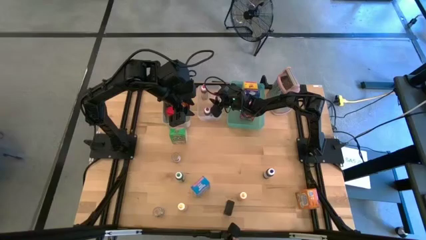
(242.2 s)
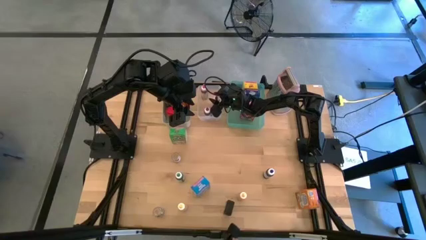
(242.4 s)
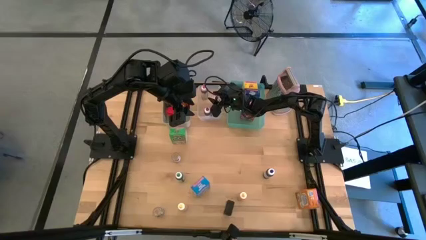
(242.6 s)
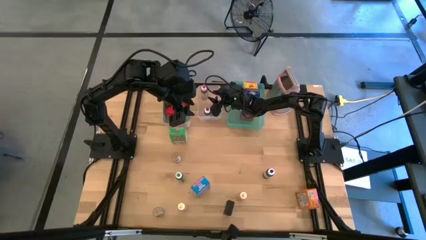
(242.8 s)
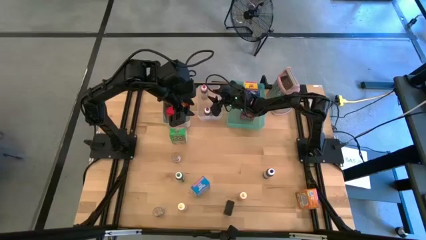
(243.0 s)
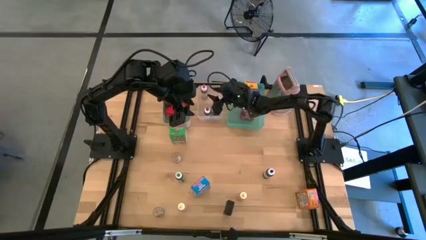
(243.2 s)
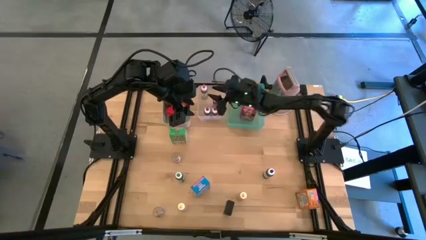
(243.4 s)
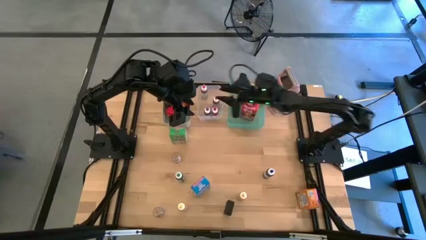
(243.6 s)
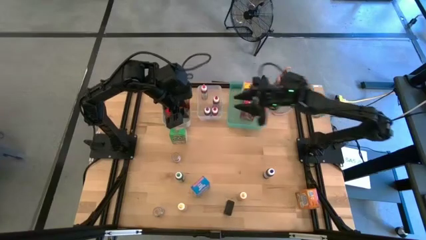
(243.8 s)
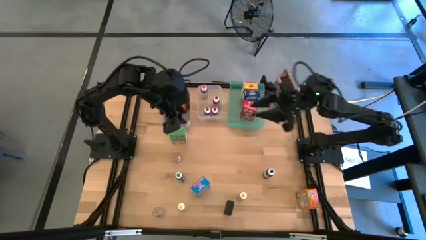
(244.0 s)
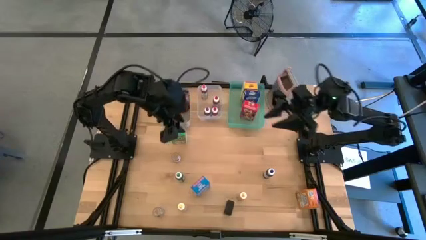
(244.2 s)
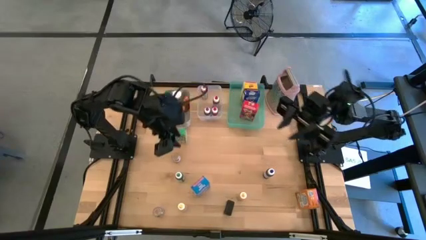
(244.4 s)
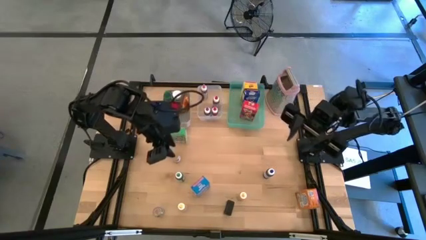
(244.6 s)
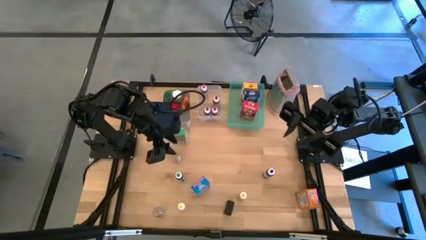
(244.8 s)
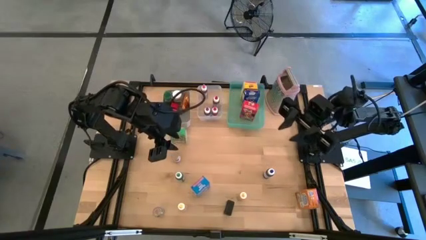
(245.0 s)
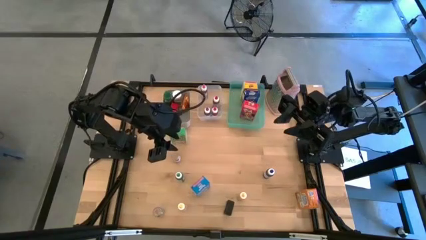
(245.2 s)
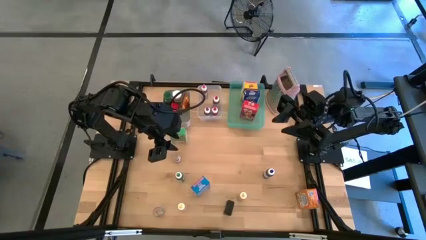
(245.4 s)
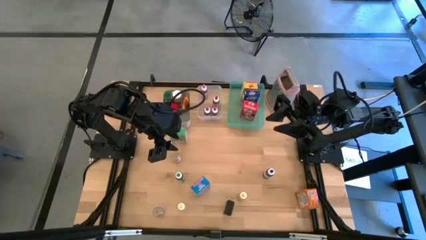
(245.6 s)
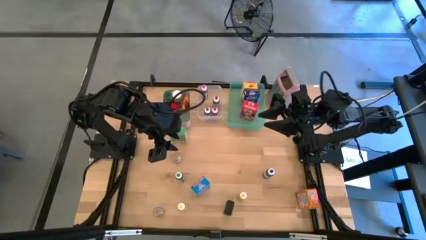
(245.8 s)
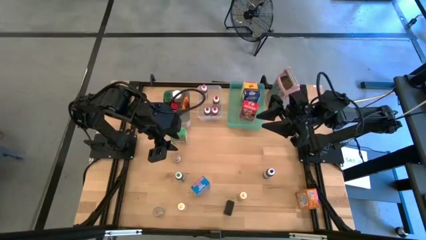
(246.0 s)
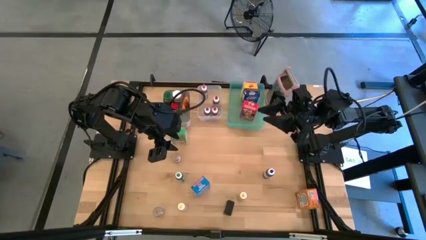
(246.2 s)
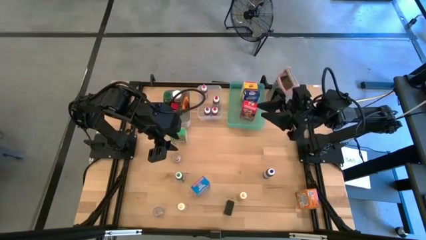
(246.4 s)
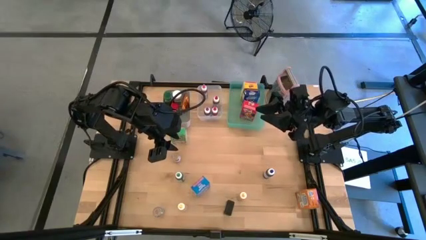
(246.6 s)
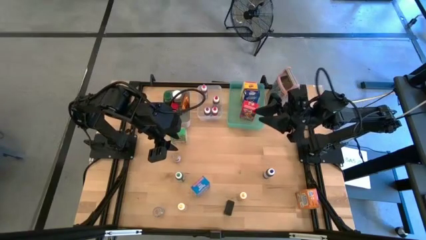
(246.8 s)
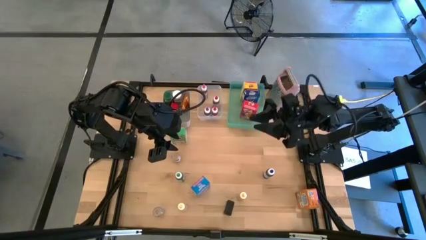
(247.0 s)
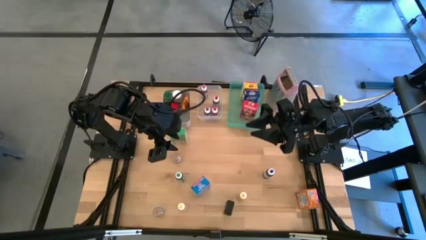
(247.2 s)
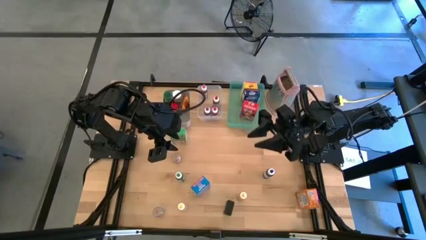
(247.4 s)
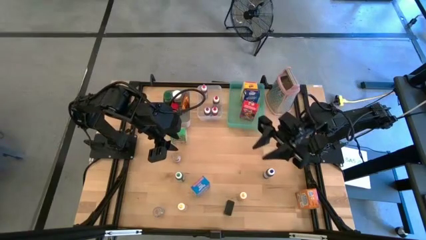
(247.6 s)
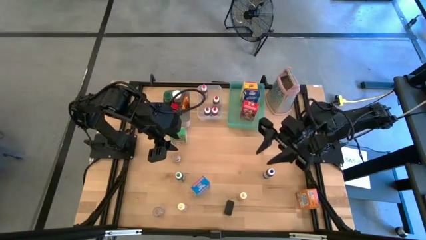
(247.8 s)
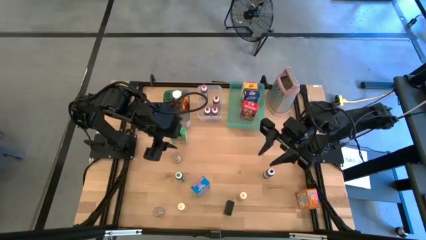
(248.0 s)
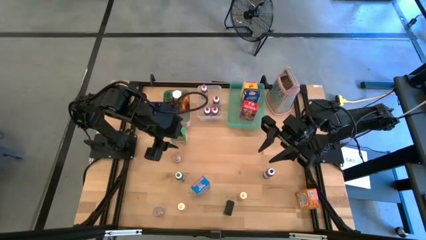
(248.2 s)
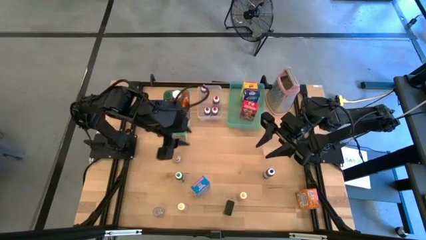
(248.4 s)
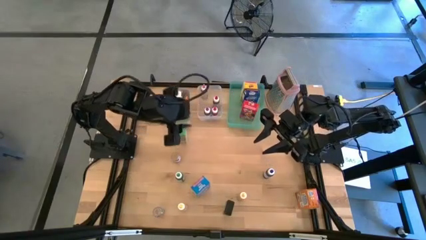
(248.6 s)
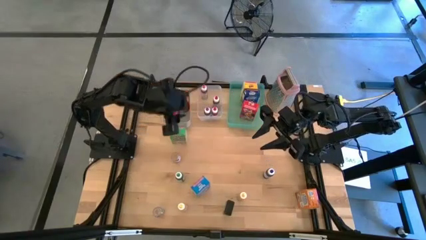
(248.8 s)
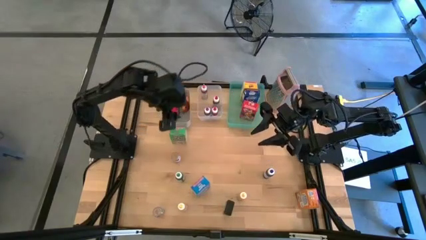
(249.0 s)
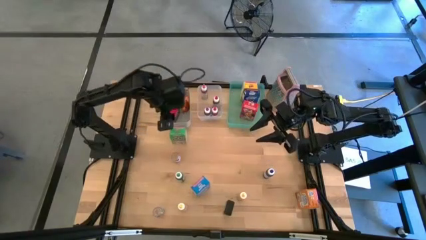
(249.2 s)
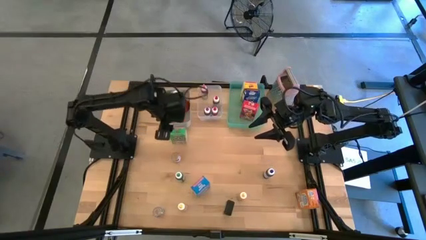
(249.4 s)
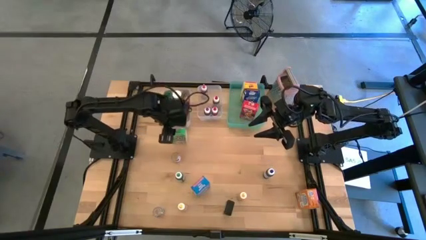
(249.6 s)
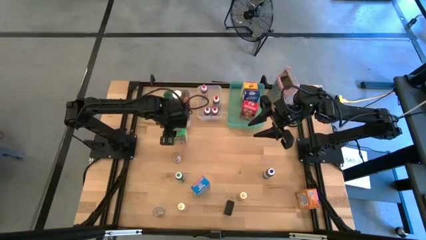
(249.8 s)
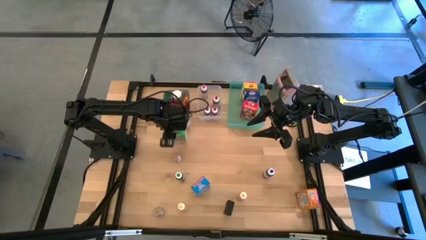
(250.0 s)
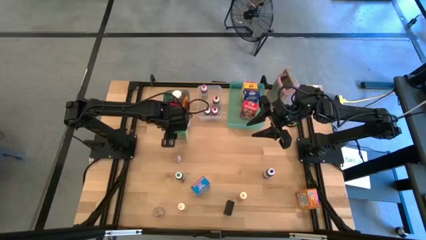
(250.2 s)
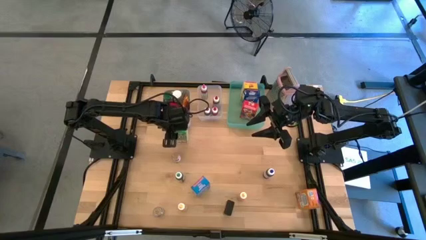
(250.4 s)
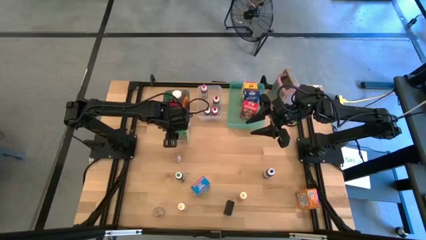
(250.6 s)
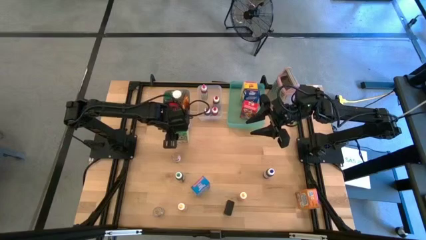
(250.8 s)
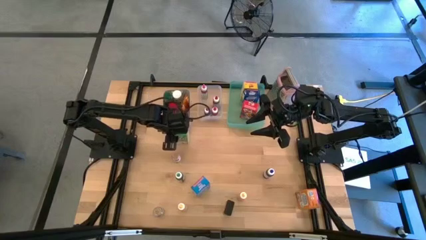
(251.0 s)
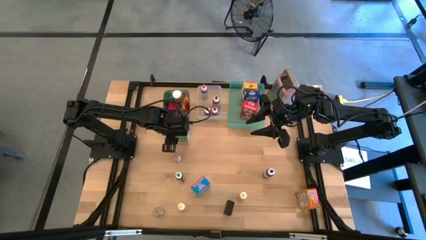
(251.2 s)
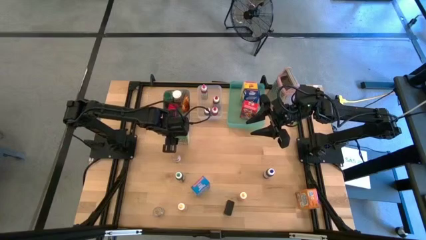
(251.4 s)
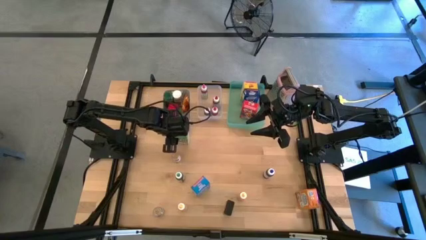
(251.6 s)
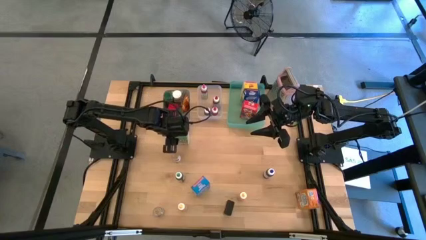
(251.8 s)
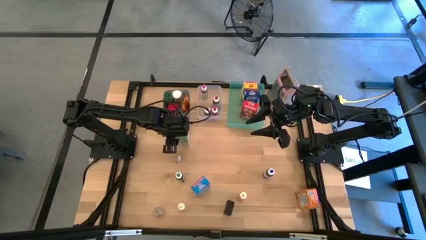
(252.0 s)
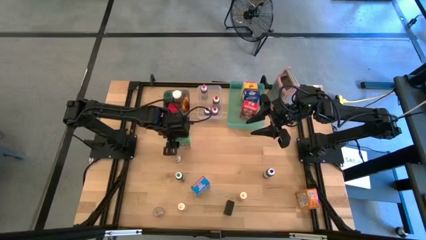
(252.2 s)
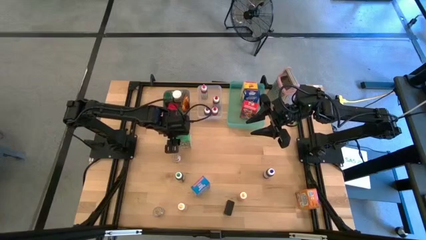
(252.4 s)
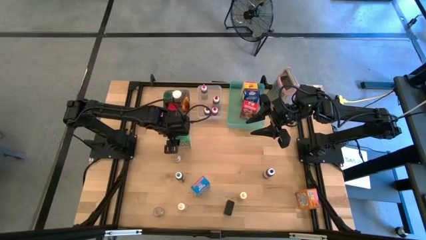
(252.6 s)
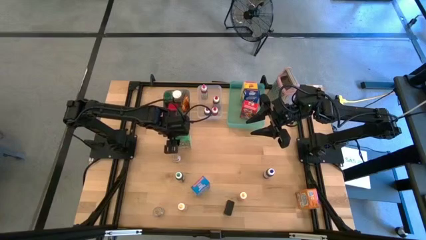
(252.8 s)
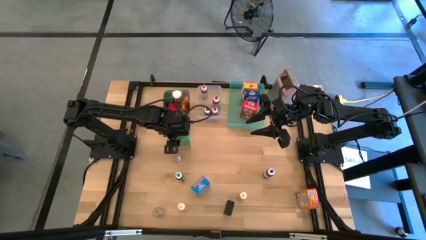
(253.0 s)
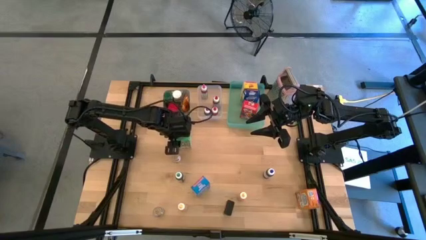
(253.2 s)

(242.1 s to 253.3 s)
Task: Pick & Place Kitchen Items
Put the green cereal box into the green bin
